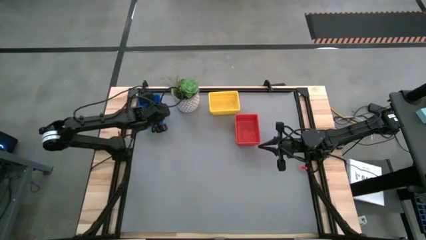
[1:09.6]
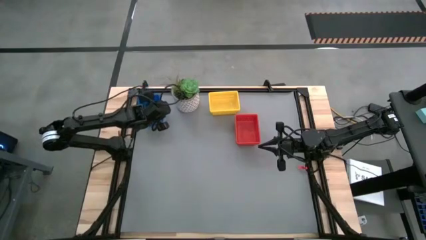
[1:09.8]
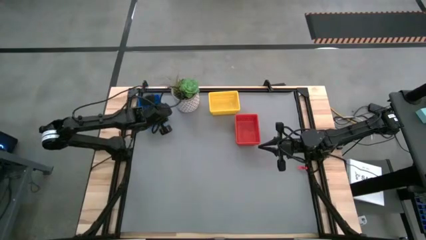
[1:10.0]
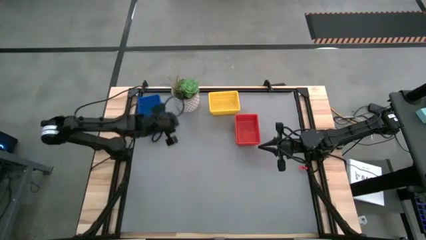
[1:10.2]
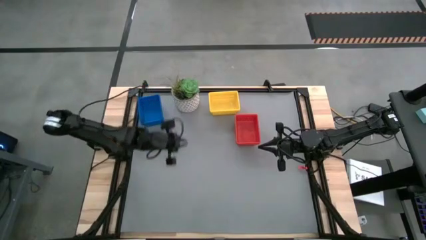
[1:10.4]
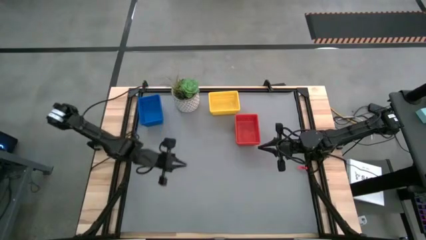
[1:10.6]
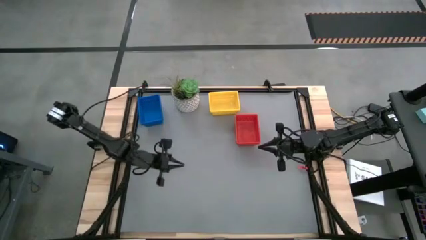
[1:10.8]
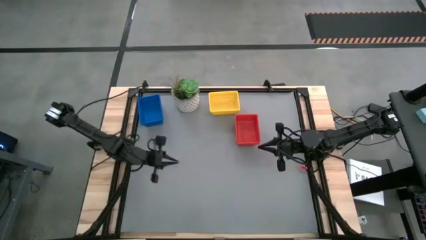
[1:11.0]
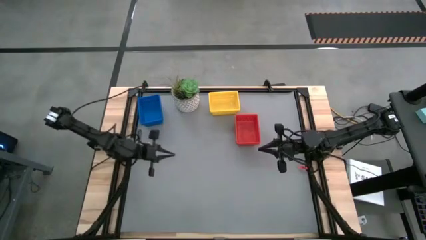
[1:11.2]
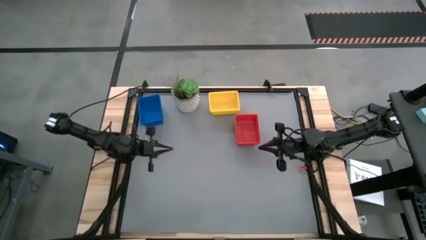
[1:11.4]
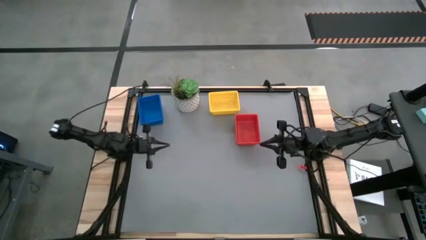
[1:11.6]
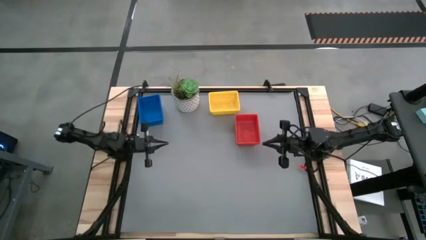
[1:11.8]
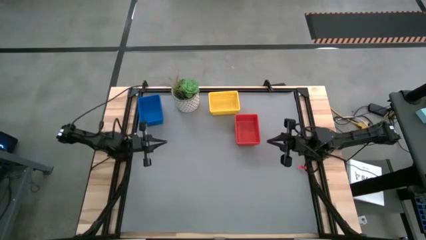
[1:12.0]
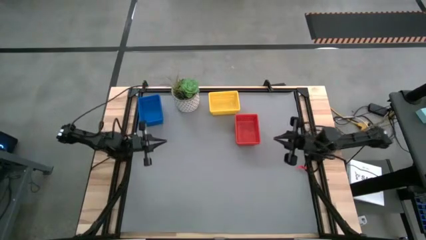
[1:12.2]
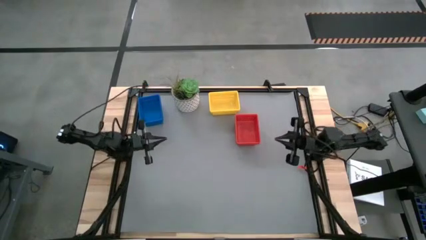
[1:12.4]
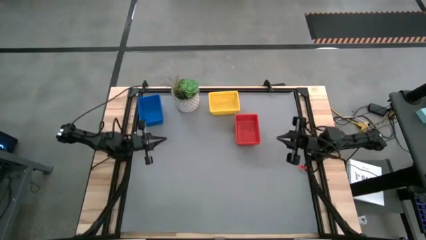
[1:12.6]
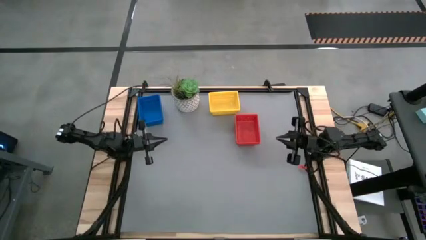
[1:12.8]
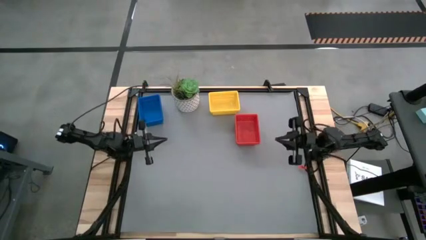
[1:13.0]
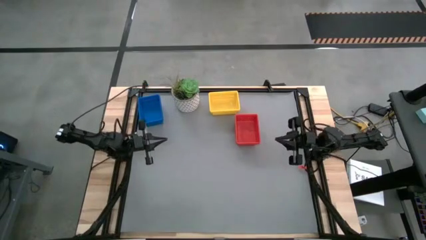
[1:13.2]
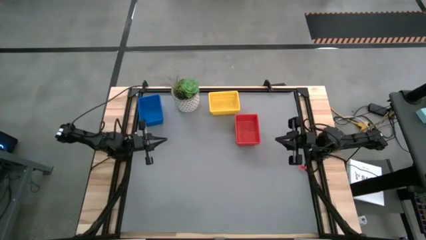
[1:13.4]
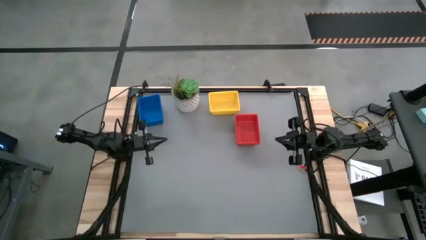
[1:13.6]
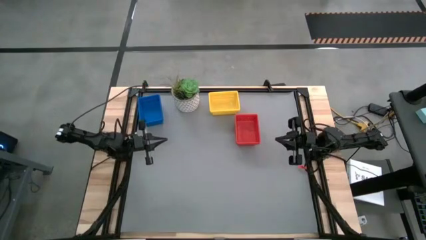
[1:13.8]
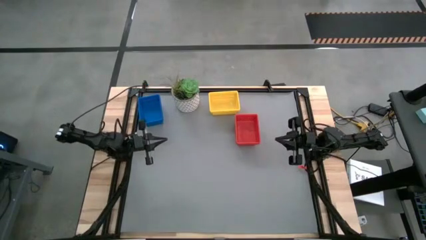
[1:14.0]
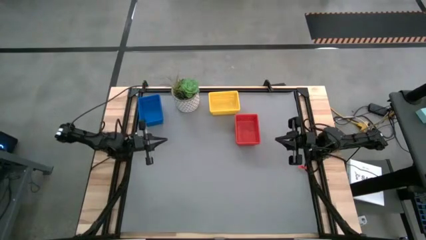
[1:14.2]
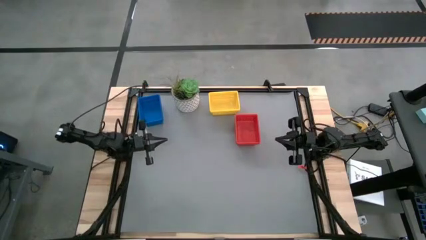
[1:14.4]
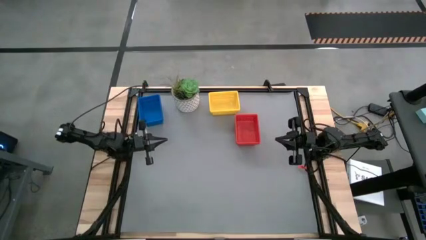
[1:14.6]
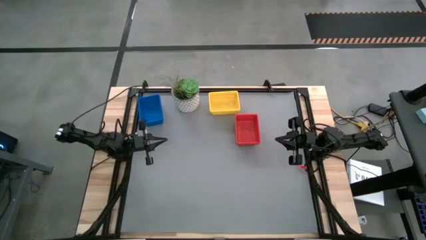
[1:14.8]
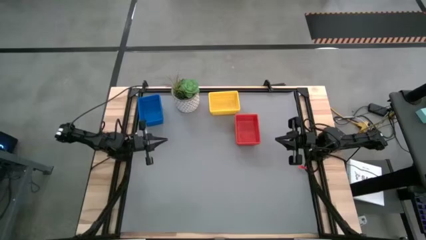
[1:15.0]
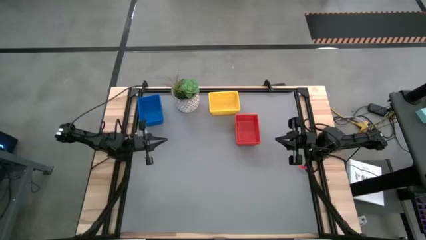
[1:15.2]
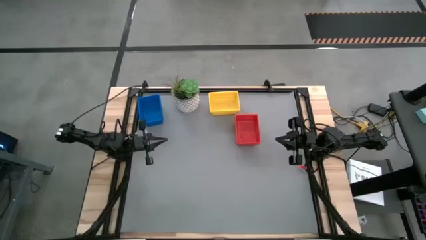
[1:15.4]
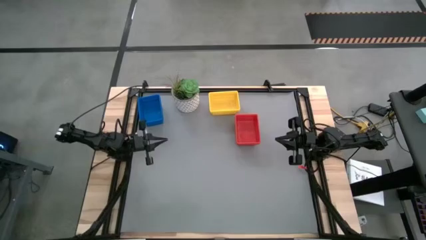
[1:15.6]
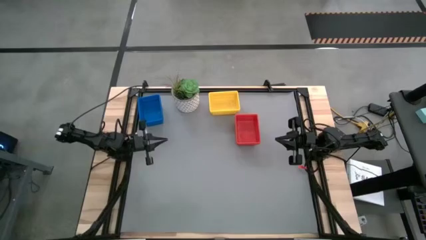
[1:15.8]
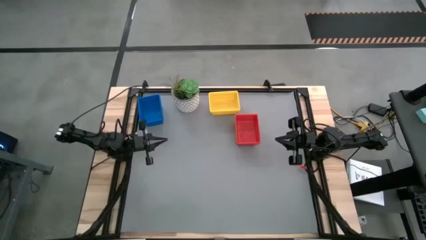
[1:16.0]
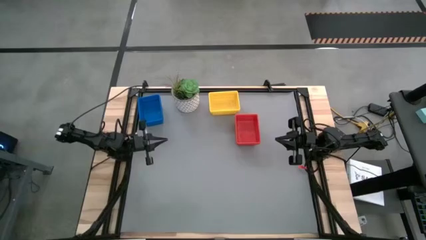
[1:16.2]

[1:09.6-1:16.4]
Return to Home Position
